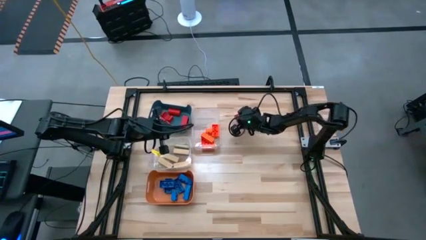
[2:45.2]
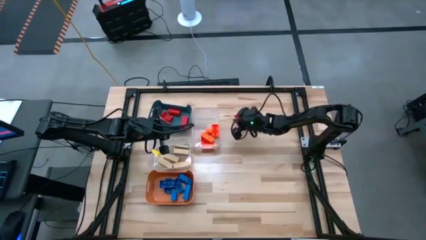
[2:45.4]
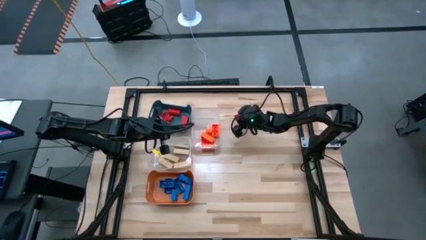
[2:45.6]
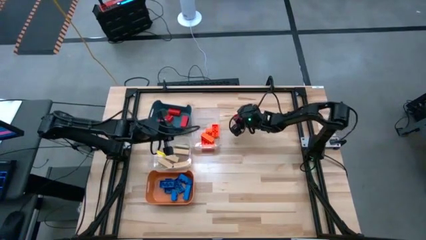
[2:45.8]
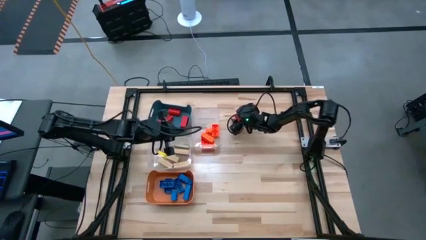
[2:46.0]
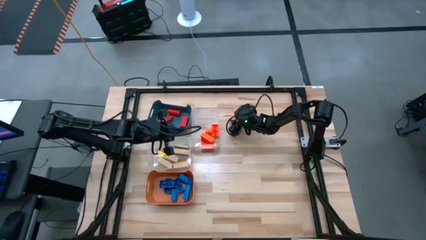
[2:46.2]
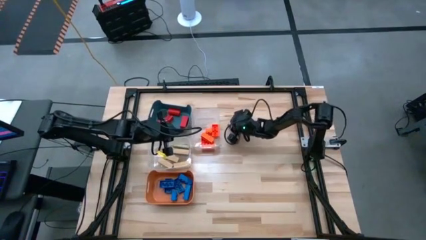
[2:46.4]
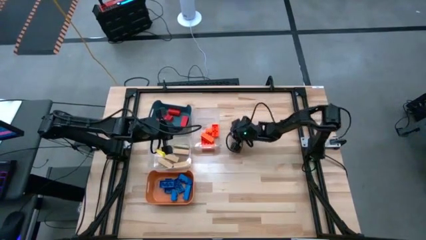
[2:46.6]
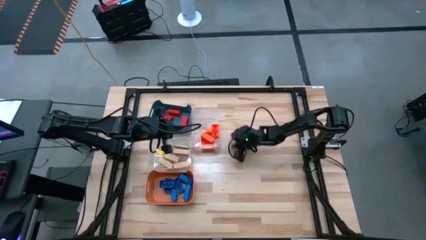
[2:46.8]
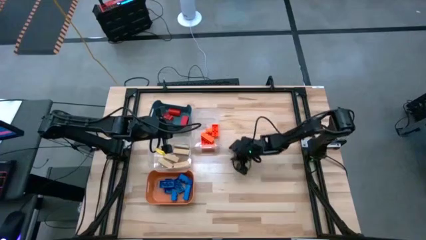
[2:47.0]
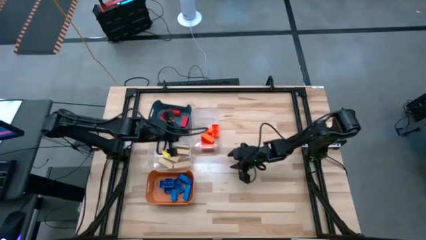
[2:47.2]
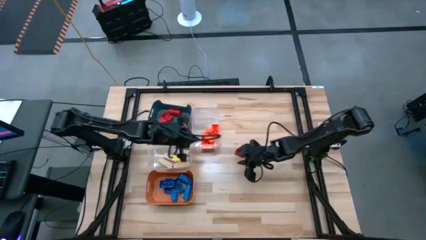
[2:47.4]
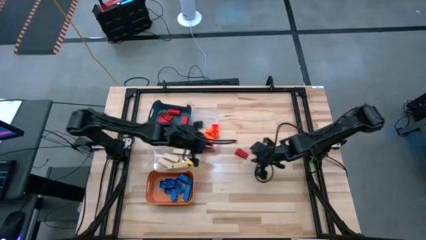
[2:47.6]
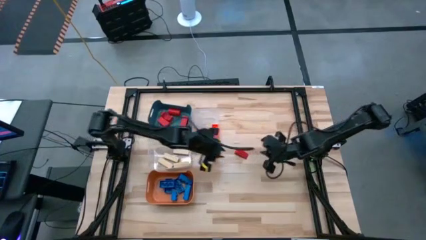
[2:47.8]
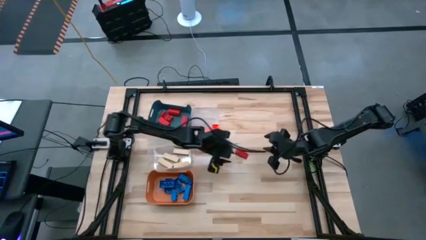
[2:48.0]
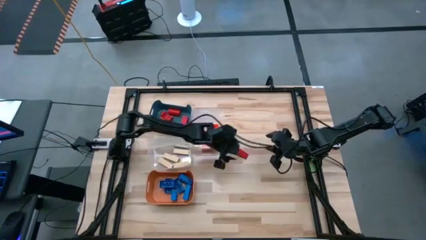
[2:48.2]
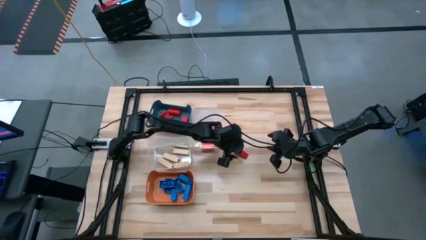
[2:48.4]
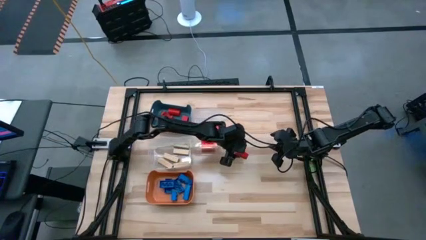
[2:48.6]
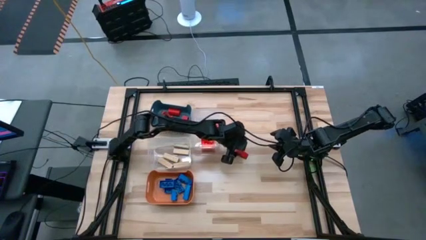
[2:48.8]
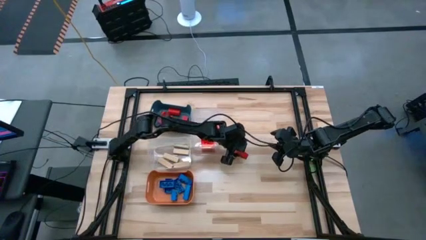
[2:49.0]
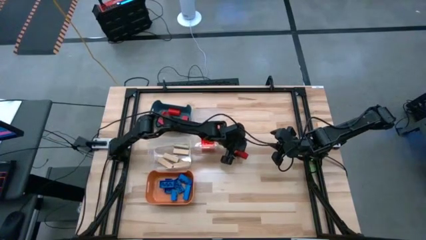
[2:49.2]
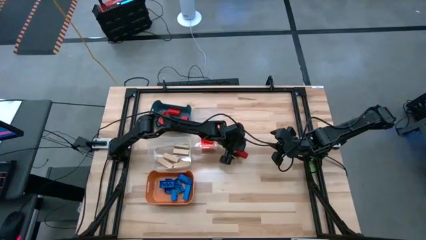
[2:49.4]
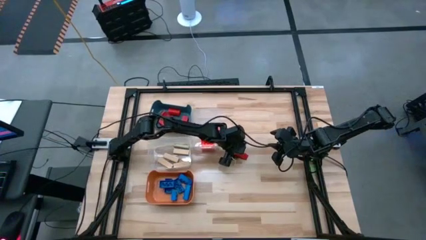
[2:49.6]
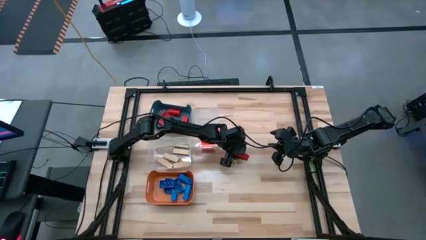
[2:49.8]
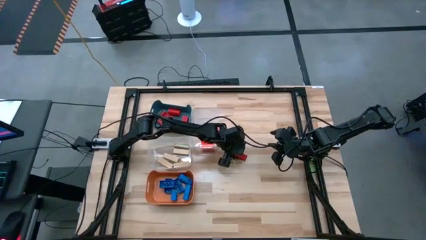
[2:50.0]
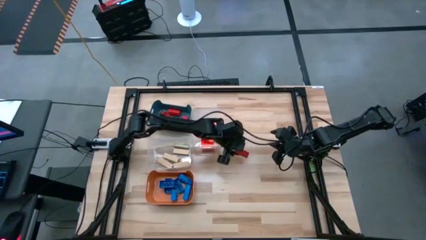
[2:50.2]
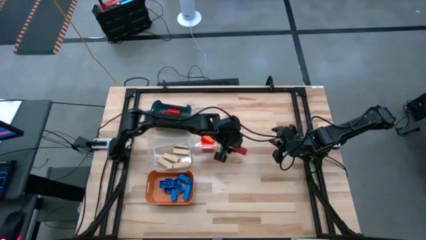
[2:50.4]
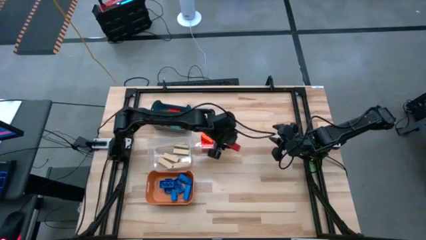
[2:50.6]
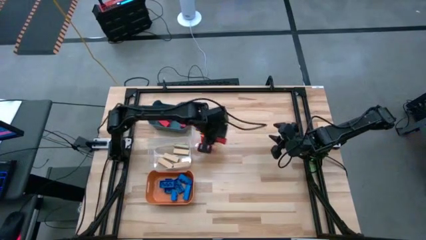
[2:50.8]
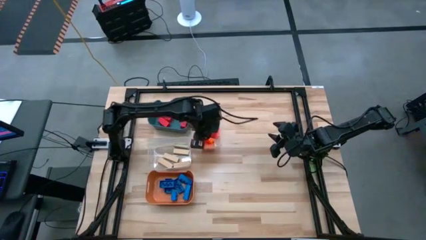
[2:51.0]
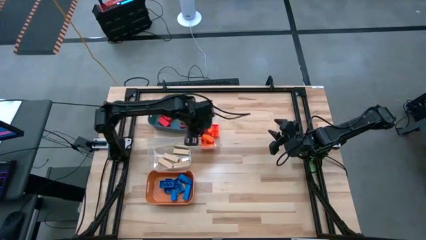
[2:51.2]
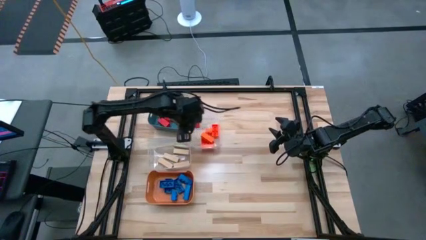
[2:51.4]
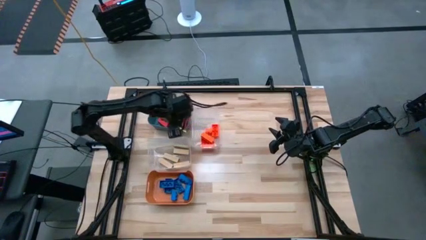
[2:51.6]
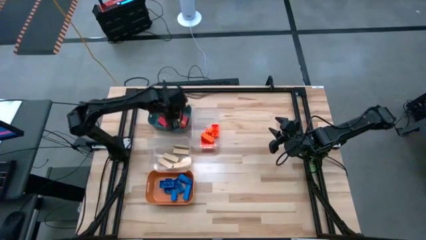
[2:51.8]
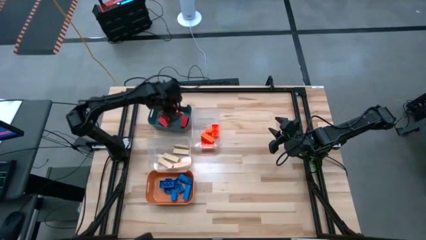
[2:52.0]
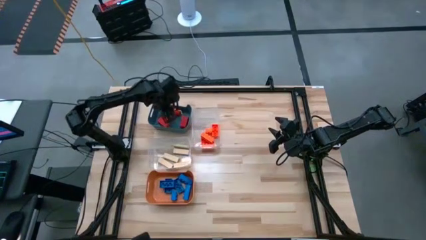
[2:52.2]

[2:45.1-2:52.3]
Task: Sort blocks
Put the red block into the blue bin

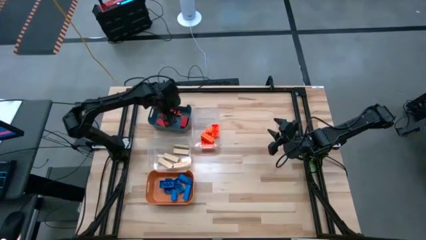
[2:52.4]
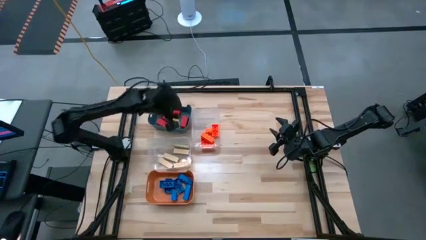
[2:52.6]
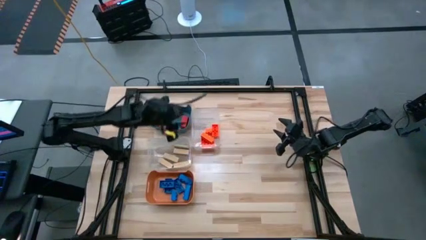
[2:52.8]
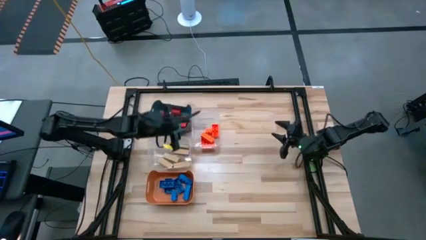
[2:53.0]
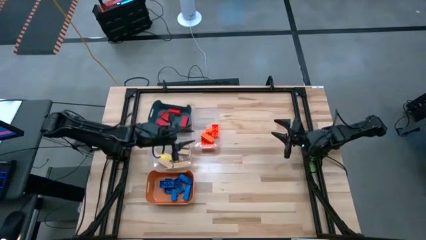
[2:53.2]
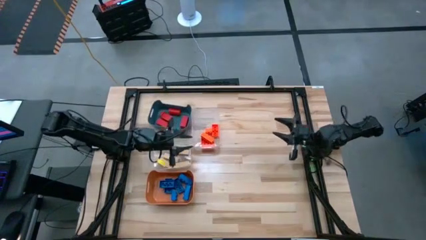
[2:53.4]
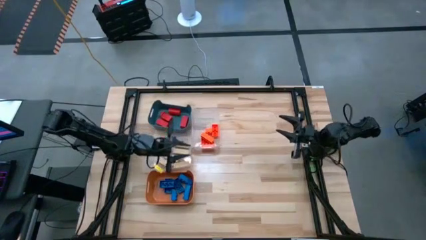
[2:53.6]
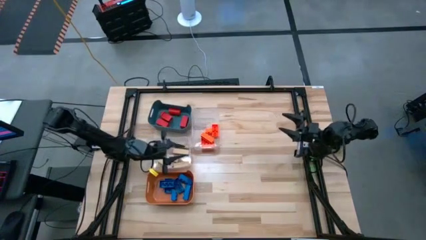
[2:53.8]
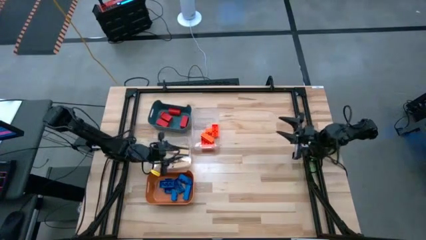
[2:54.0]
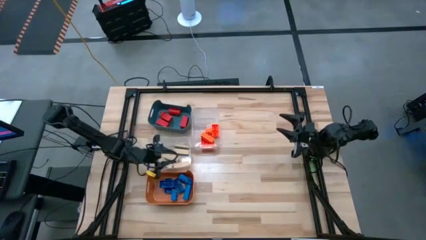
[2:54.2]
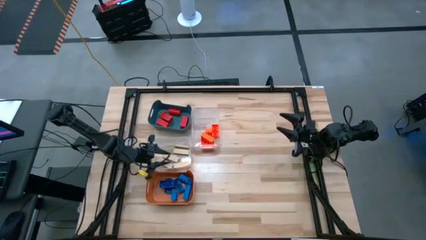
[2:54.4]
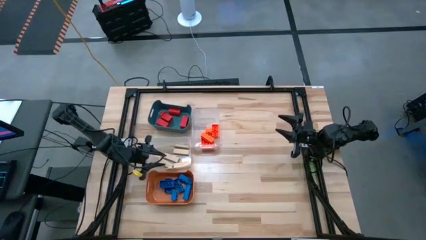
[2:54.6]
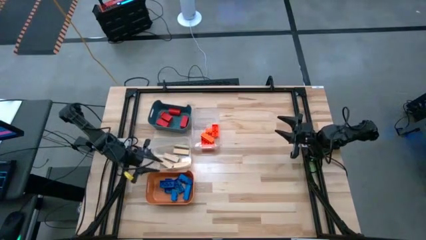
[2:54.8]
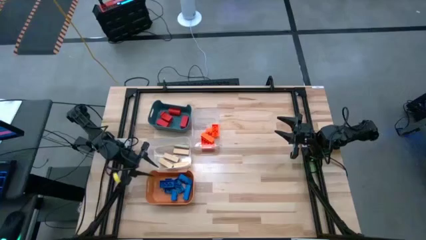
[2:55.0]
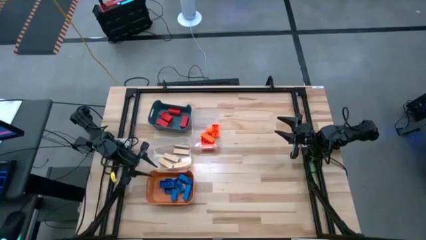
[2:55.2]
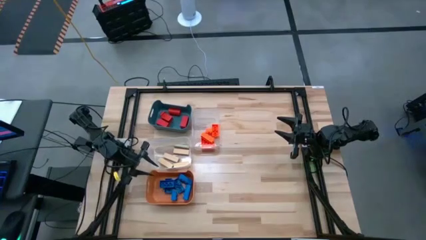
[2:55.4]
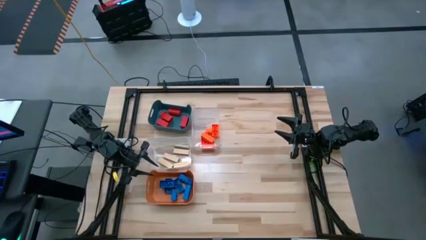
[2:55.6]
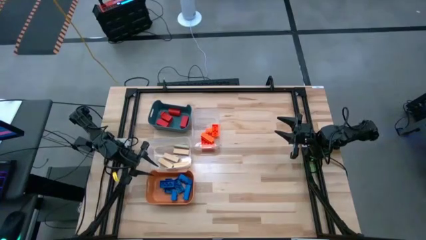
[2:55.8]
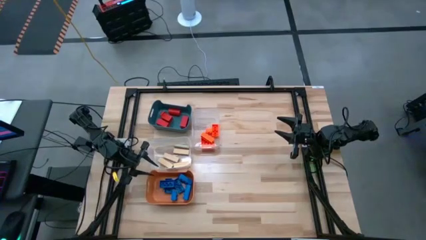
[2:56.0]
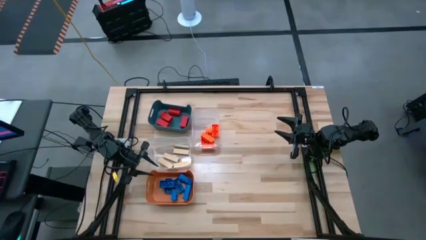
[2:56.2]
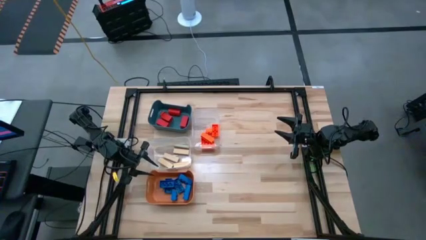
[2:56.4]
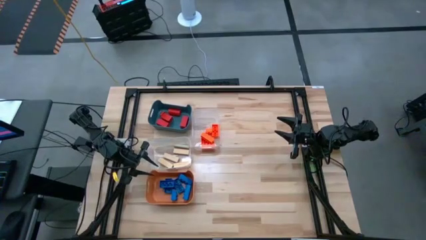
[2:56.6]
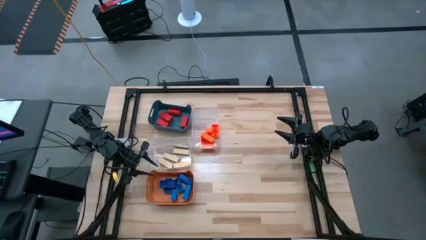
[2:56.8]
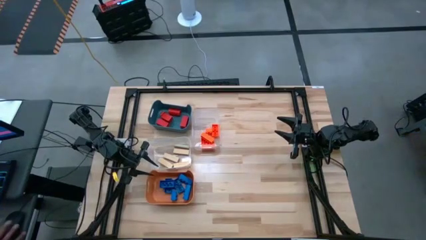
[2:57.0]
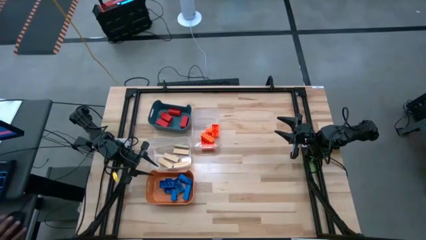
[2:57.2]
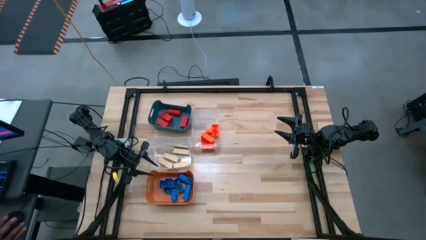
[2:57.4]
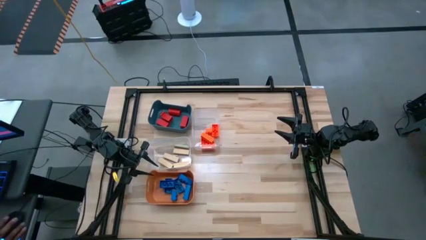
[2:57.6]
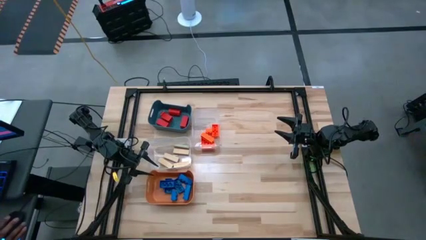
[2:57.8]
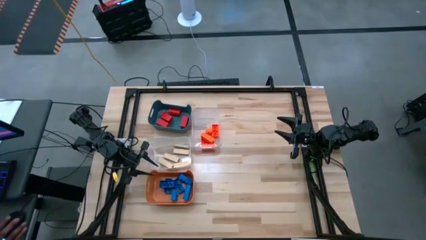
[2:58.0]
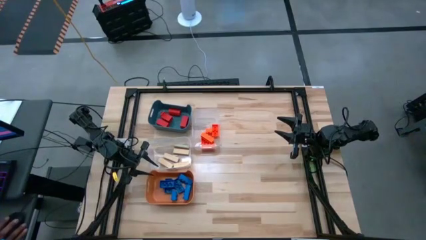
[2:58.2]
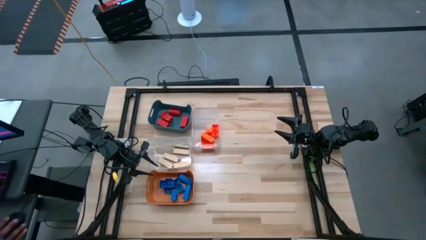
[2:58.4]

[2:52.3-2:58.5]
Return to Home Position

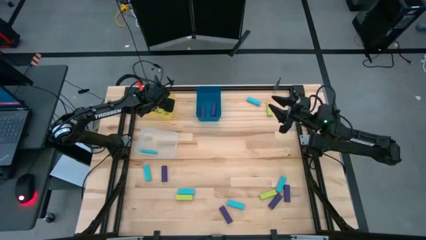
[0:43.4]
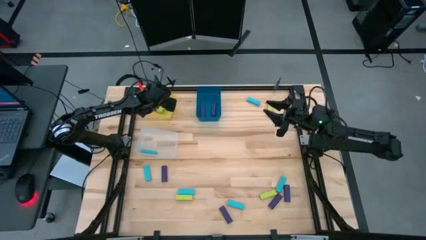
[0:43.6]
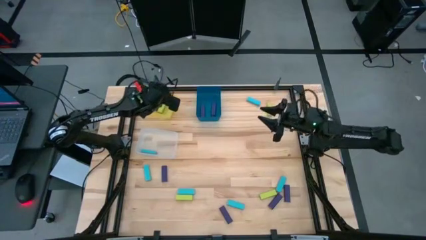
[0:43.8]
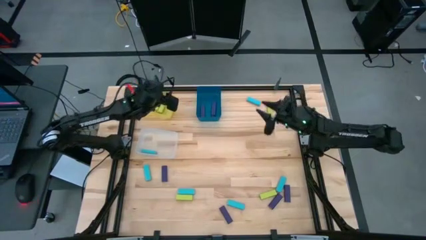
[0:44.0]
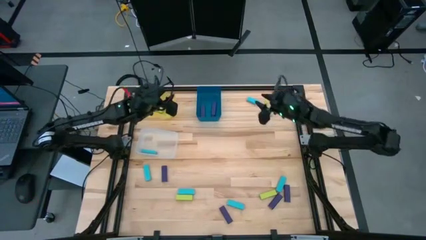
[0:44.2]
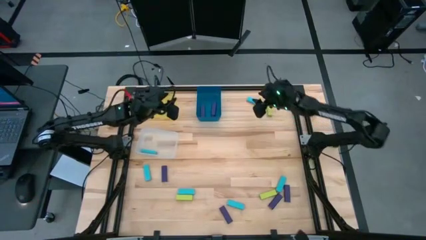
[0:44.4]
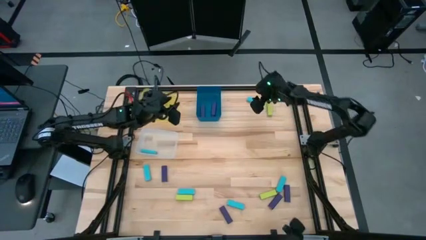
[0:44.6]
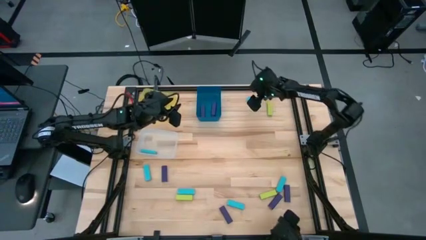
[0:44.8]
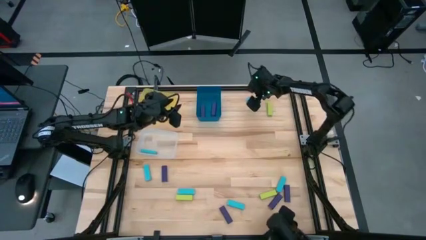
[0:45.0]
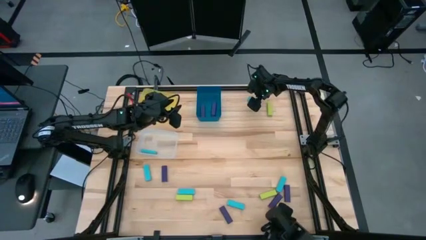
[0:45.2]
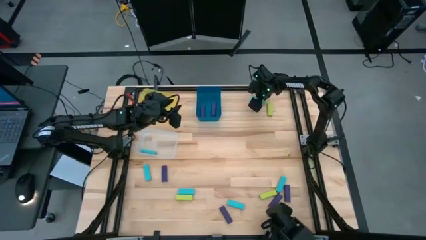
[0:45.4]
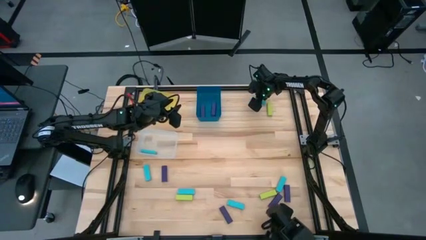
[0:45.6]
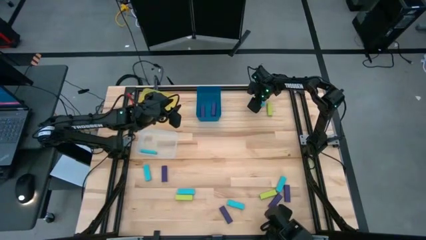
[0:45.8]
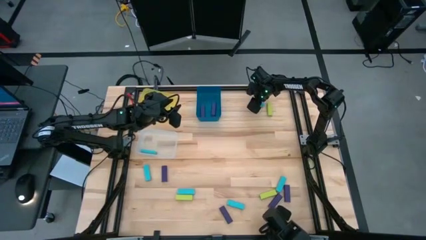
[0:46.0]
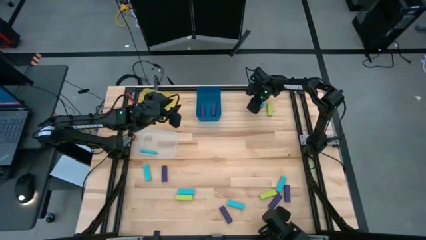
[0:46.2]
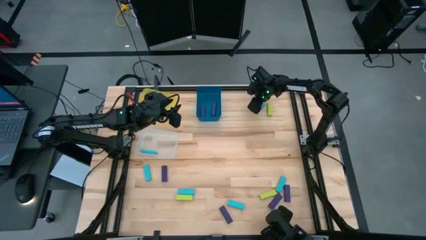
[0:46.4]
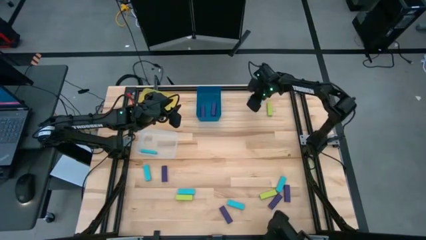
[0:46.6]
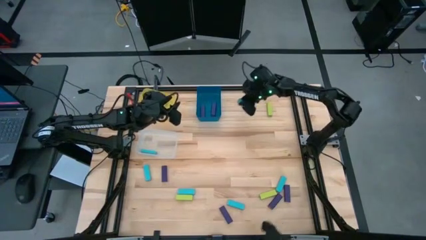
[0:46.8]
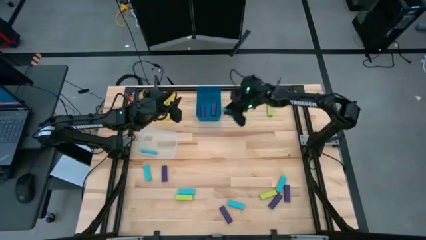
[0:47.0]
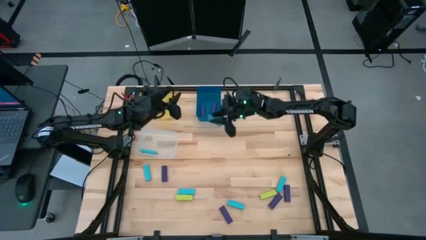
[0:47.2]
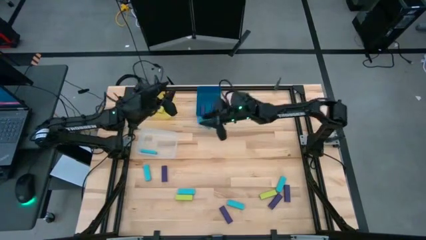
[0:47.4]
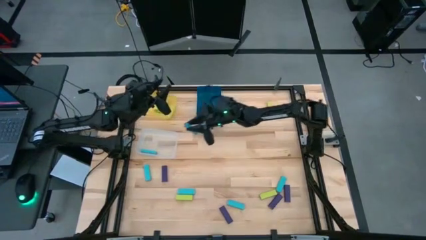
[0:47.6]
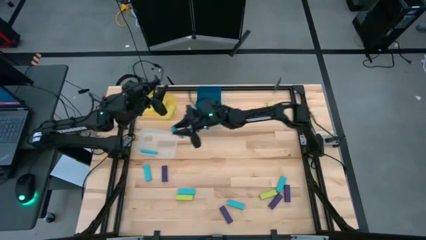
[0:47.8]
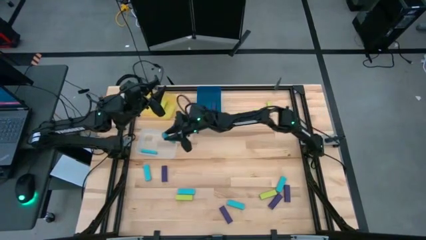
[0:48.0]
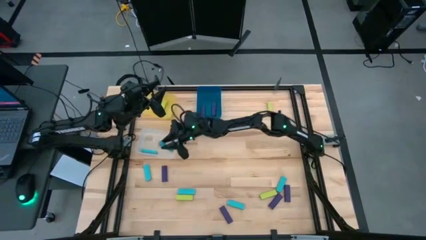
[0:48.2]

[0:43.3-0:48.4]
Task: Sort blocks
Put the blue block into the white bin
